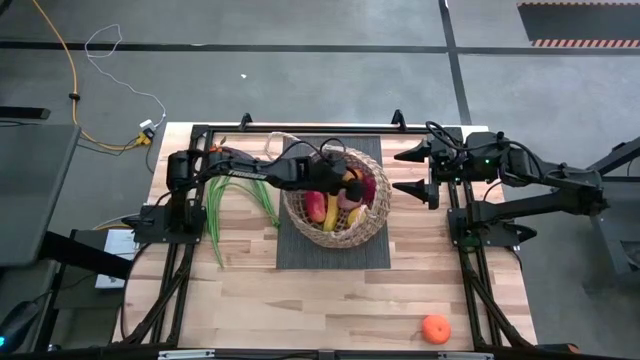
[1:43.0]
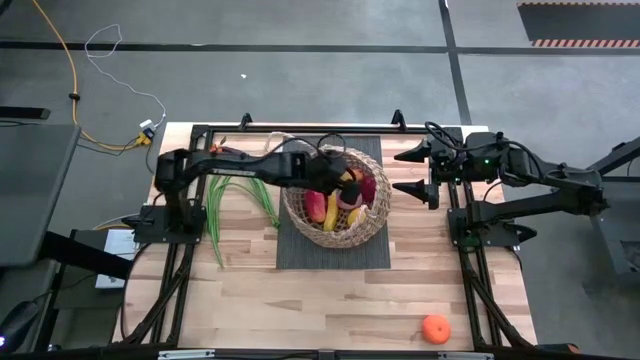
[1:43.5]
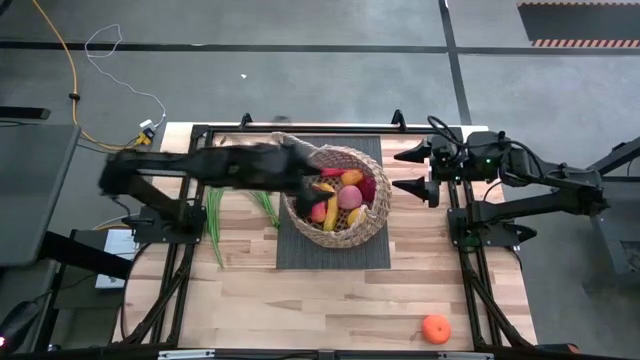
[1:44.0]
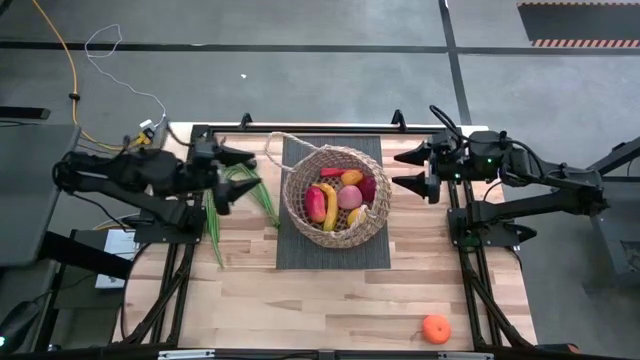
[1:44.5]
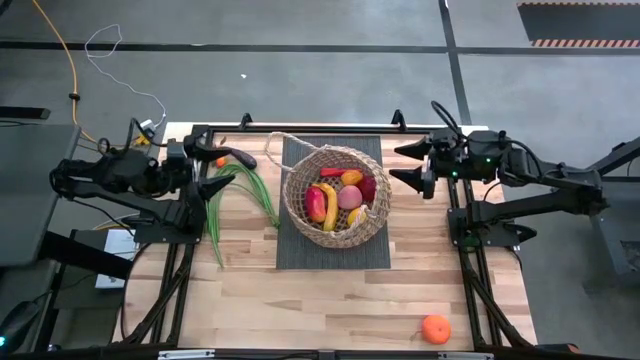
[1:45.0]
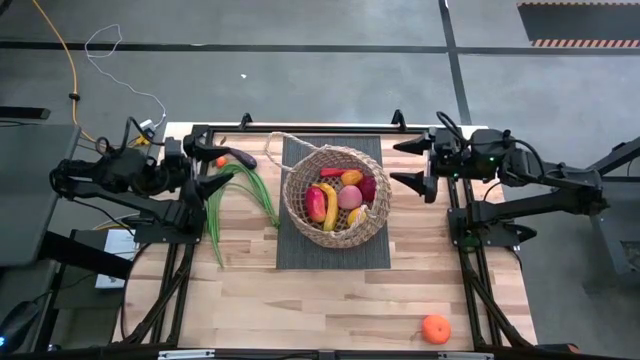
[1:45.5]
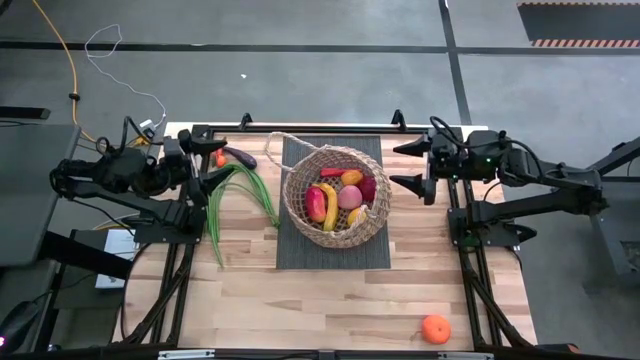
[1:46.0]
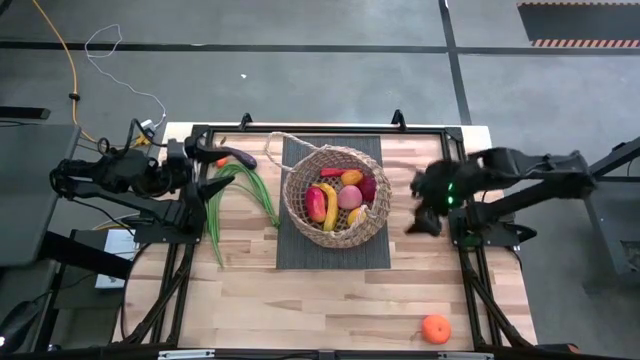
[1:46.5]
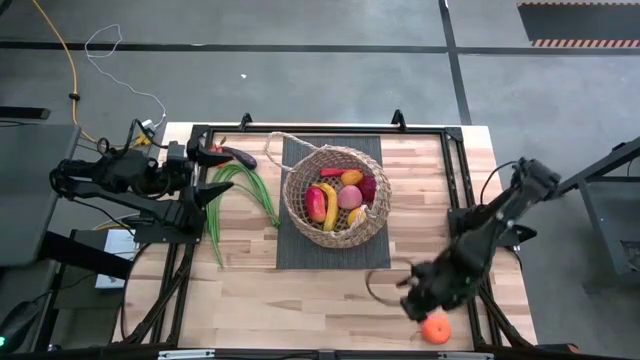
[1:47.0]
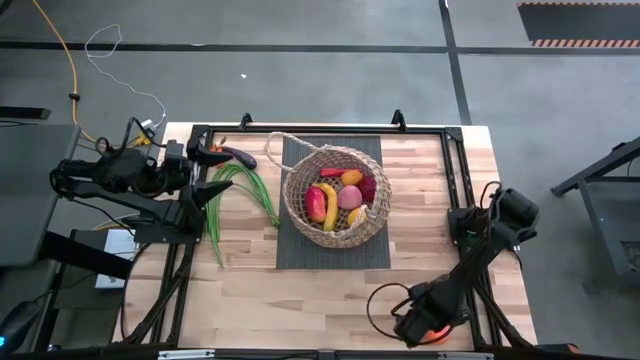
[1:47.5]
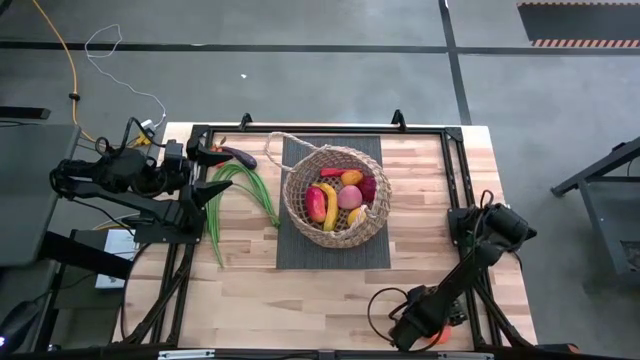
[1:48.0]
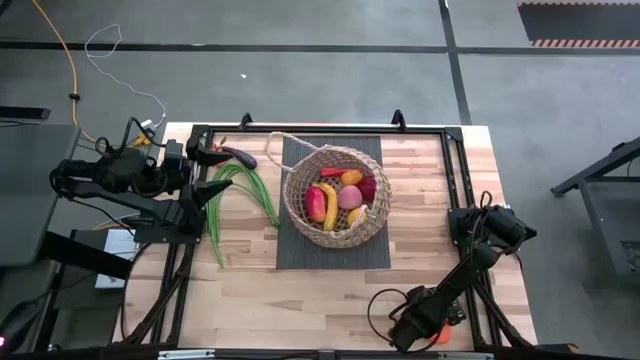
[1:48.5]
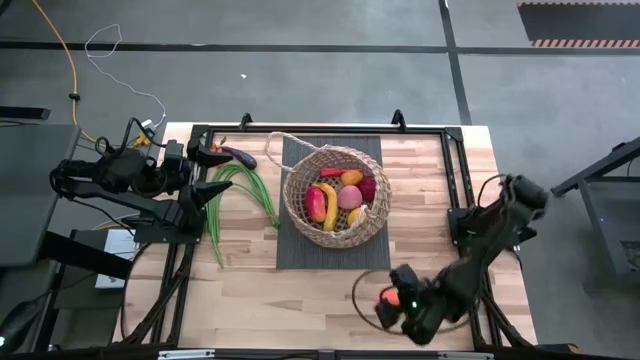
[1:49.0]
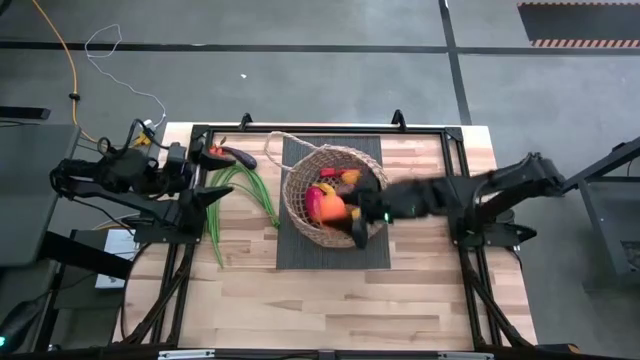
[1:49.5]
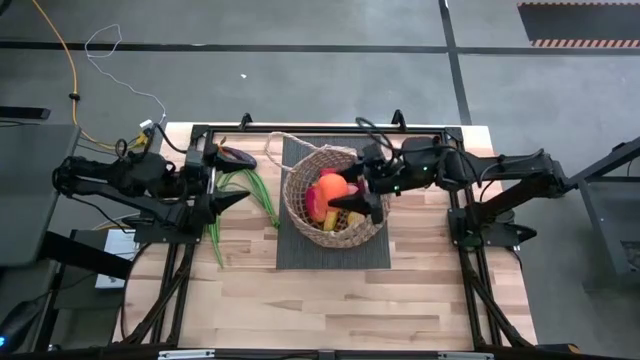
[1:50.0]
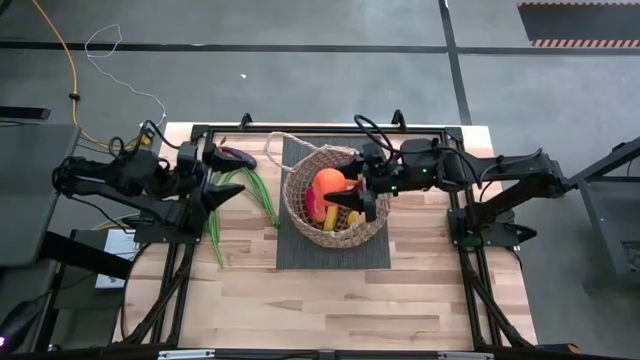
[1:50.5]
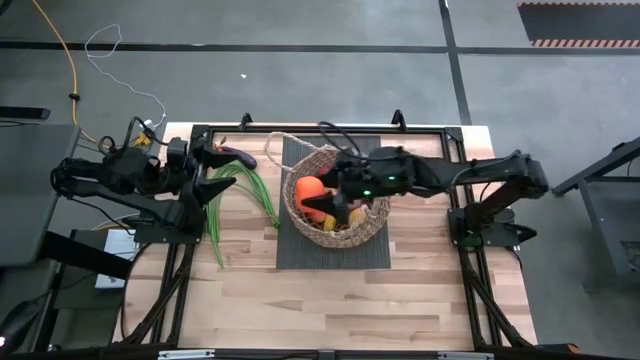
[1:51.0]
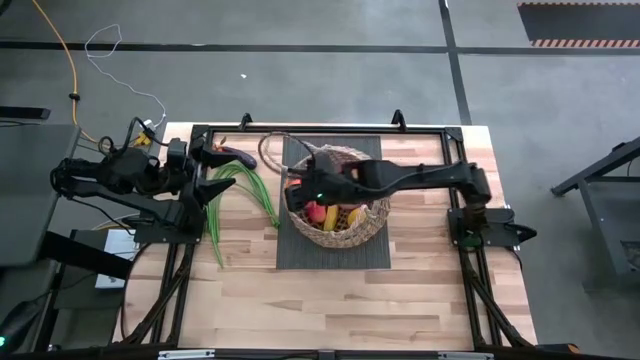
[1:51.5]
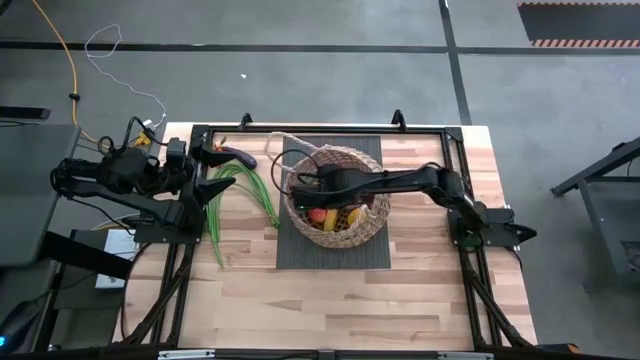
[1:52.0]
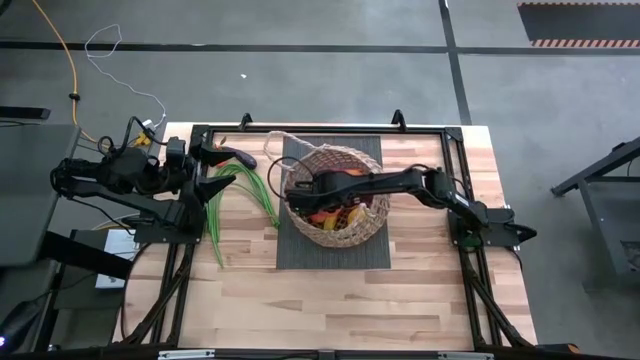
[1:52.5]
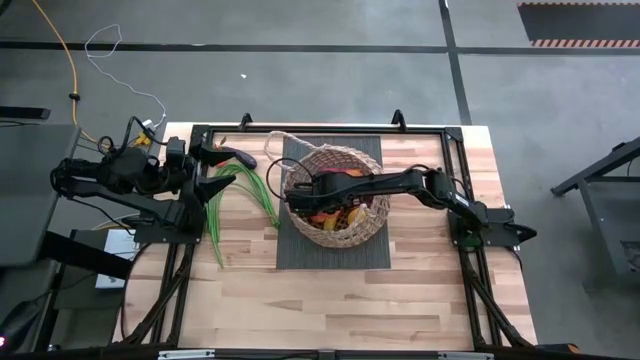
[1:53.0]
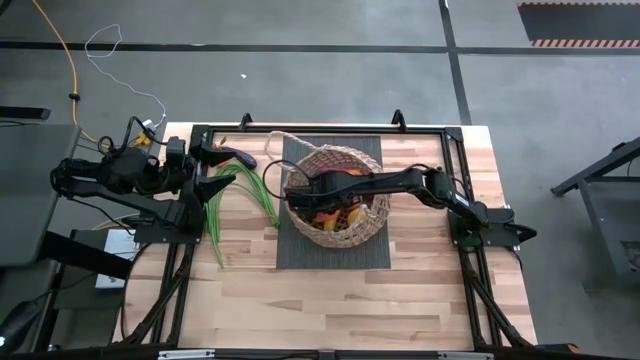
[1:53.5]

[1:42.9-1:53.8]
Task: Build produce basket
Put the orange into the woven basket

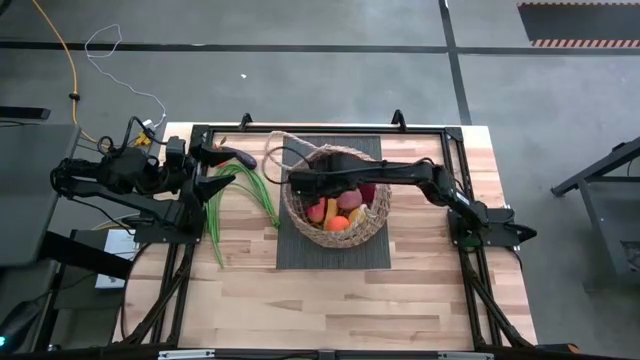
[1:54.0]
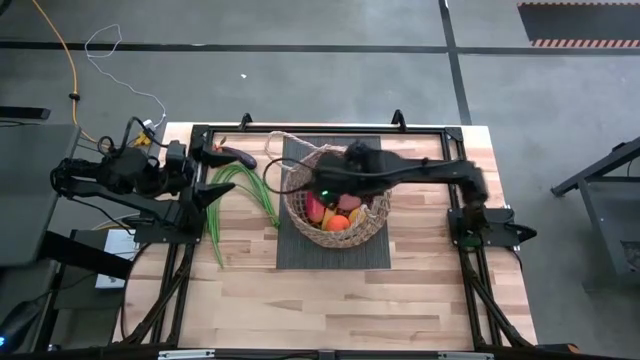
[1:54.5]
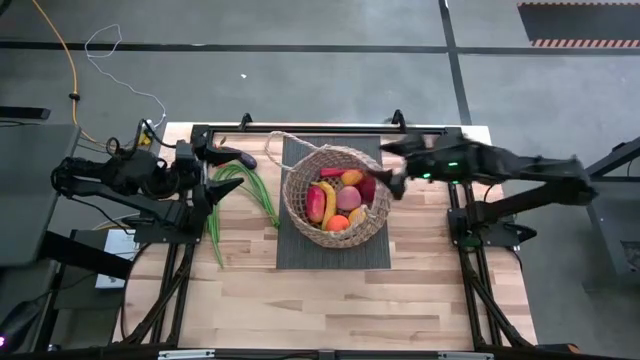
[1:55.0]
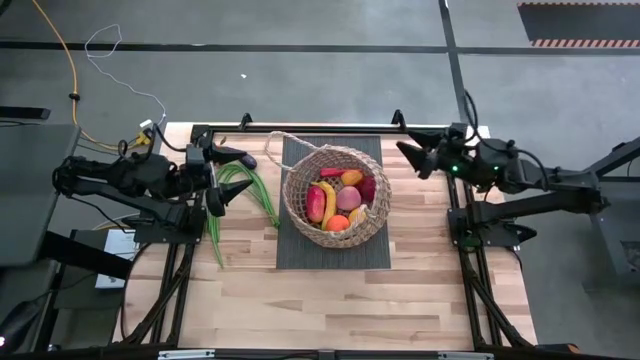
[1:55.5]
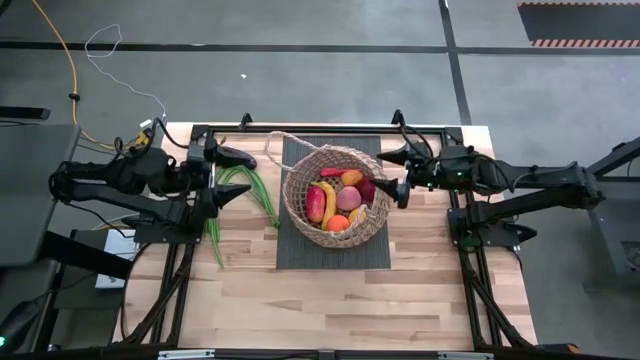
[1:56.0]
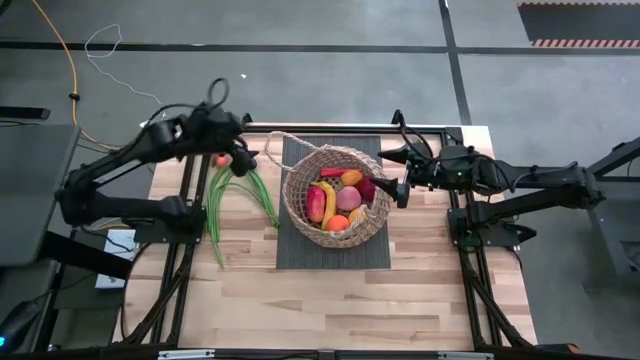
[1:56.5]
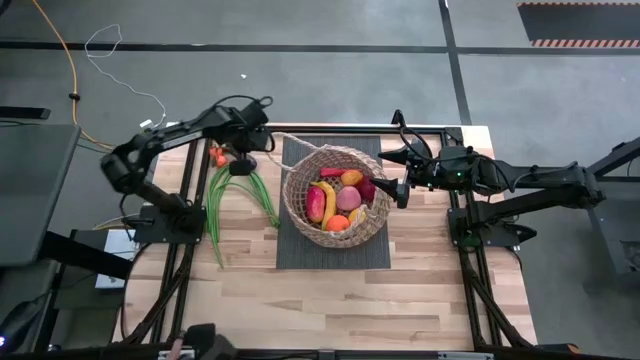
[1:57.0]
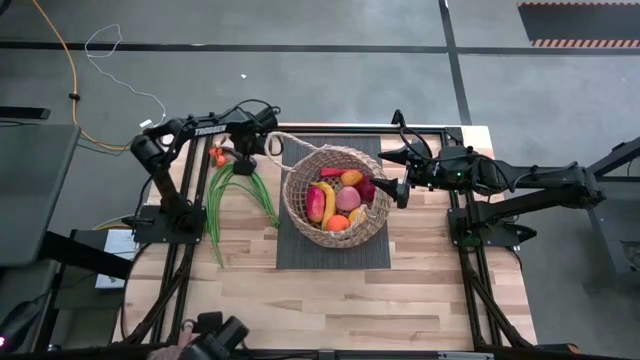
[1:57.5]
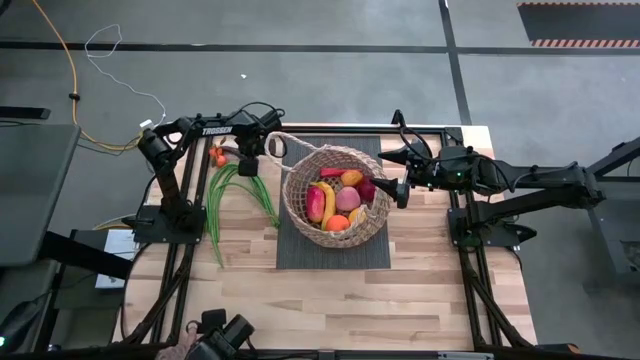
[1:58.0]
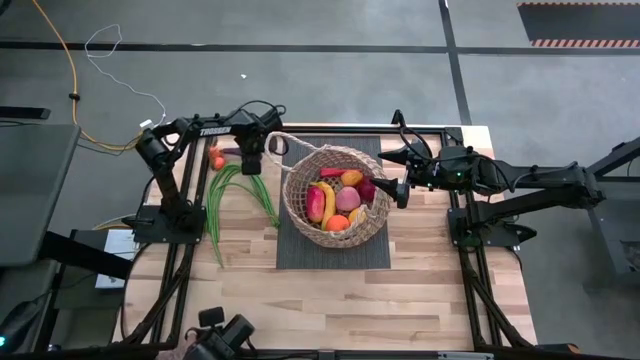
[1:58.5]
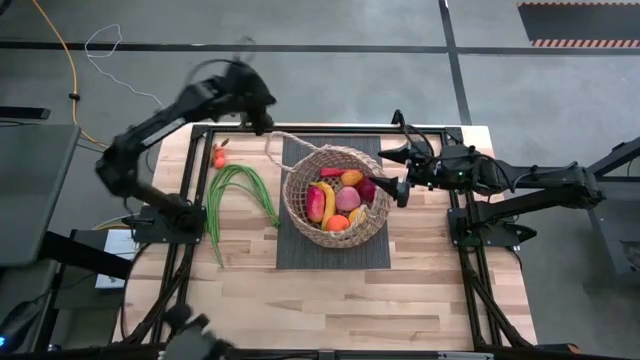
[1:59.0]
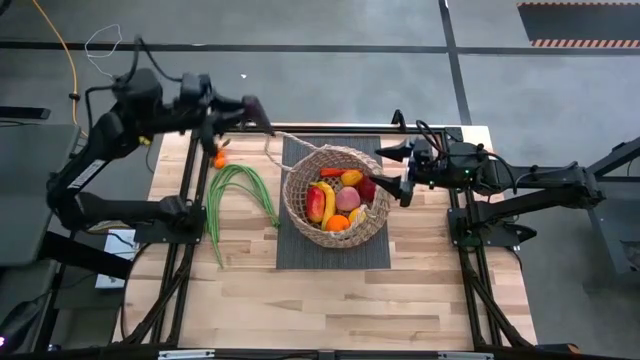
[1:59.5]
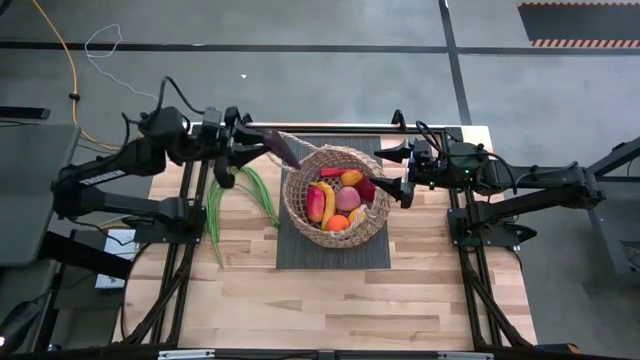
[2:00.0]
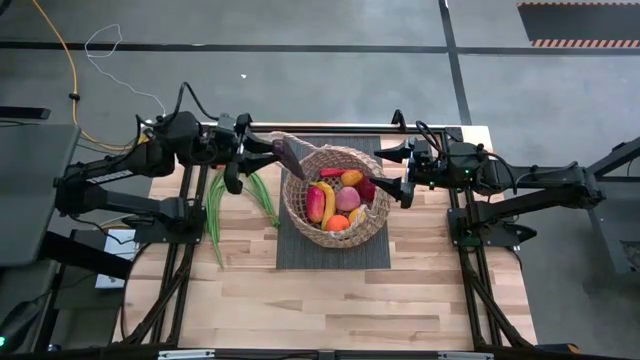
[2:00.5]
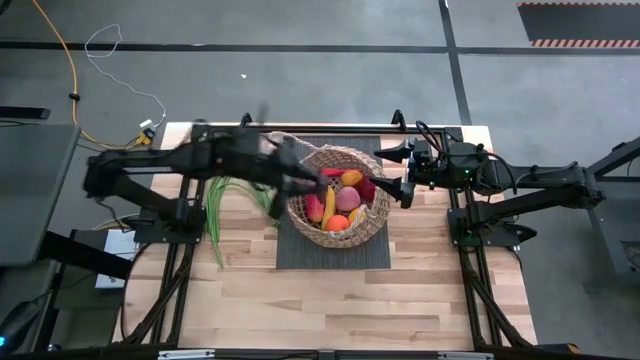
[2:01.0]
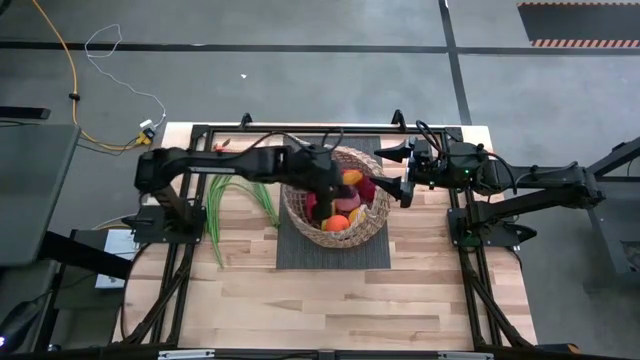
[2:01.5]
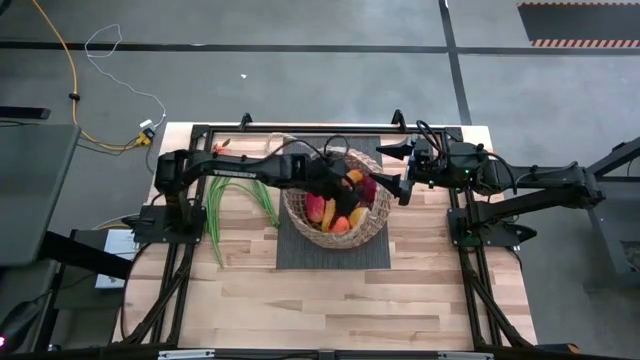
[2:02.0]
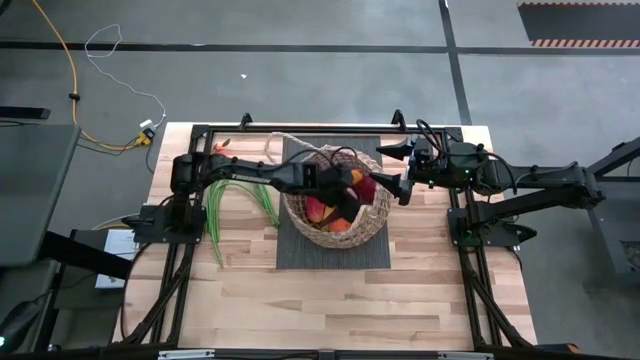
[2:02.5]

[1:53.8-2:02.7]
Put the eggplant into the woven basket

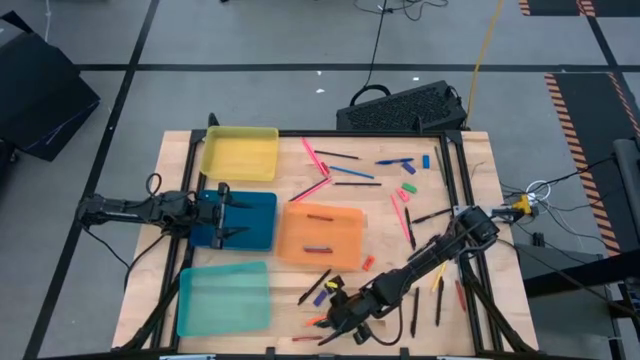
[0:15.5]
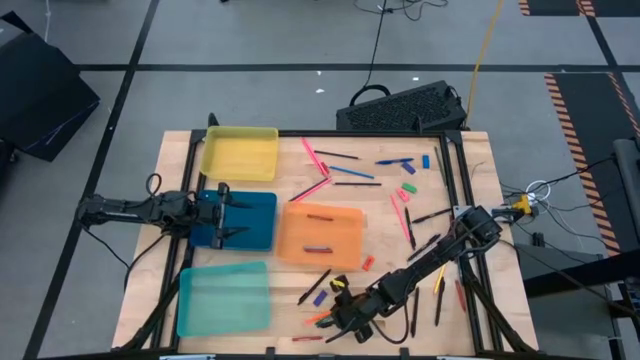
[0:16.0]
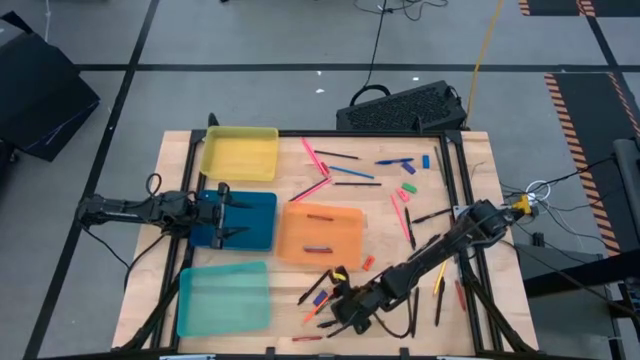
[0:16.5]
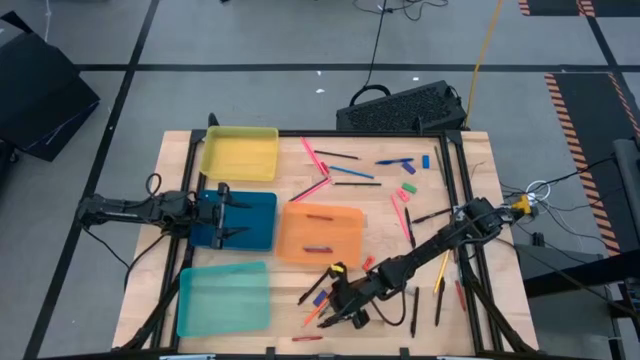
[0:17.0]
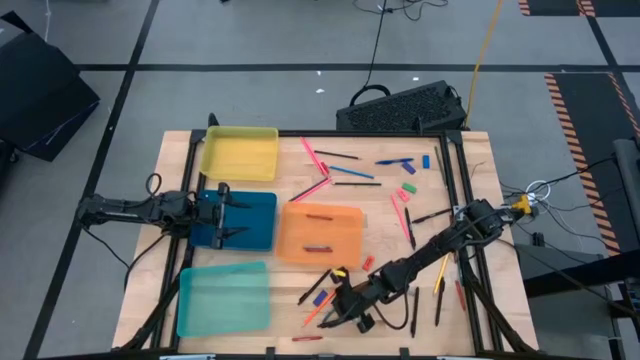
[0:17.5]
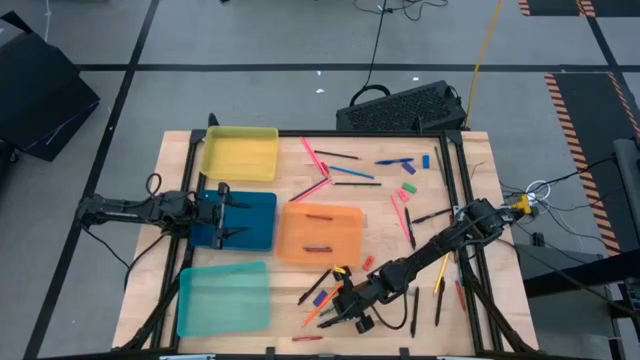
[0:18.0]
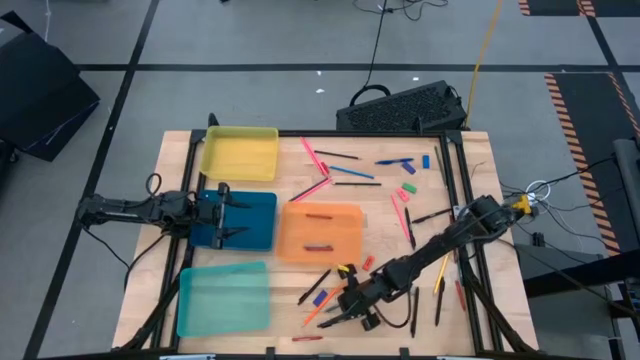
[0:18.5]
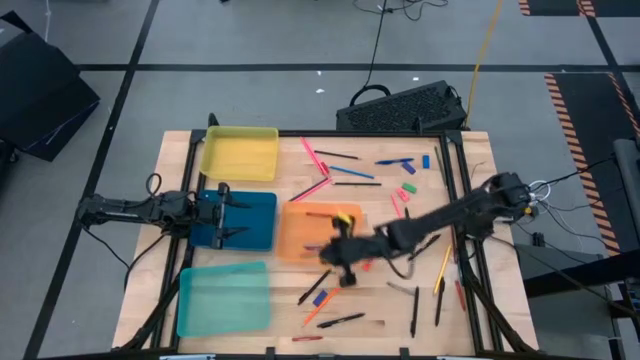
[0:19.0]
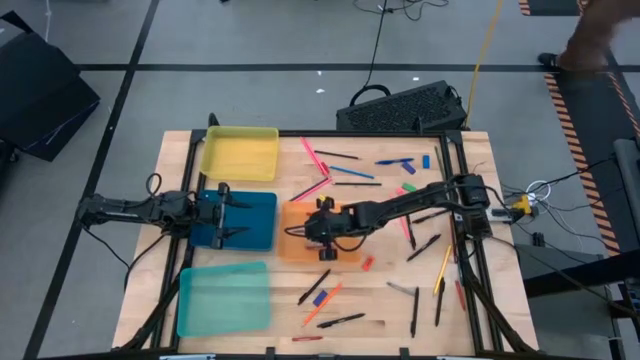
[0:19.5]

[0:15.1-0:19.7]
Task: Sort crayons/erasers/pens/pencils in bins
Put the green crayon into the orange bin
